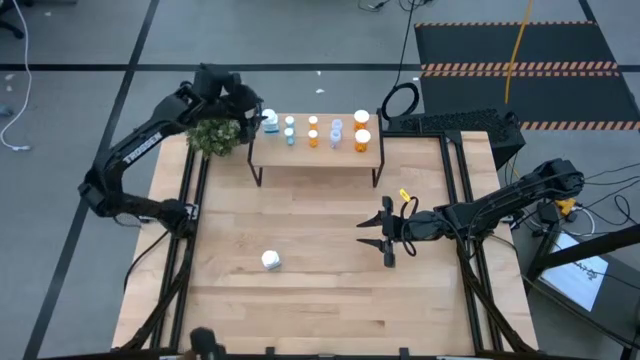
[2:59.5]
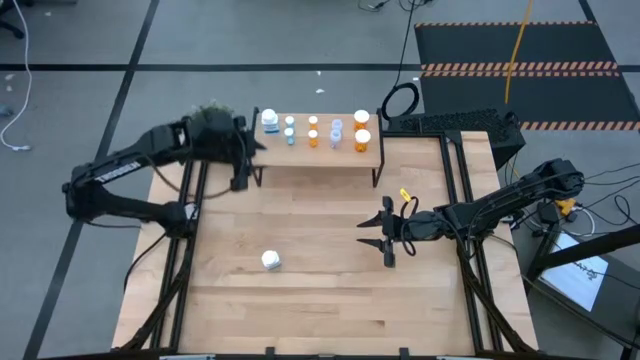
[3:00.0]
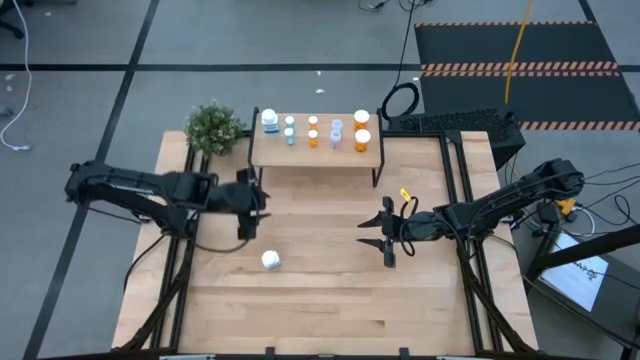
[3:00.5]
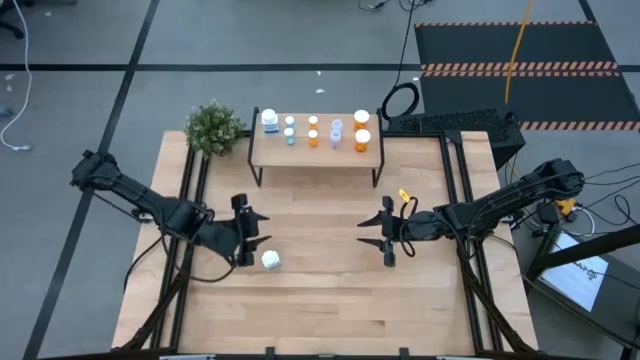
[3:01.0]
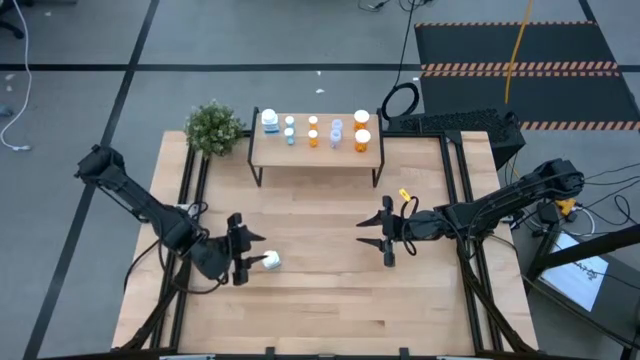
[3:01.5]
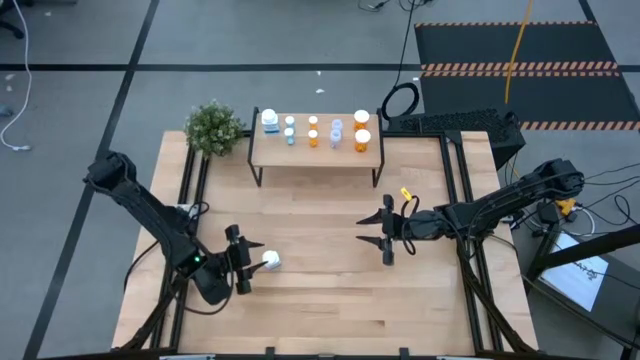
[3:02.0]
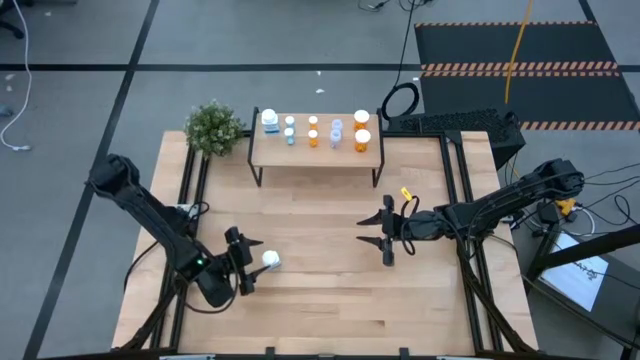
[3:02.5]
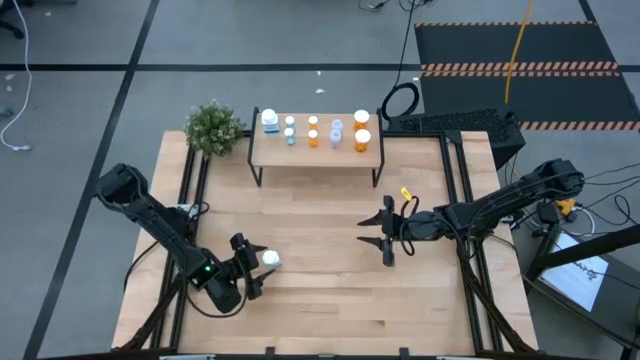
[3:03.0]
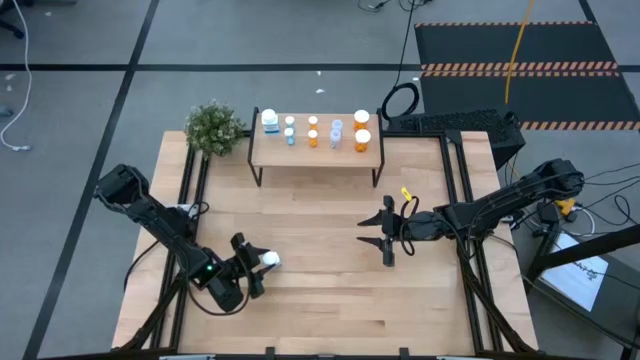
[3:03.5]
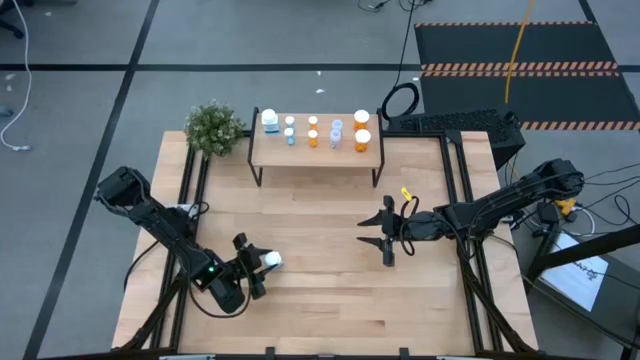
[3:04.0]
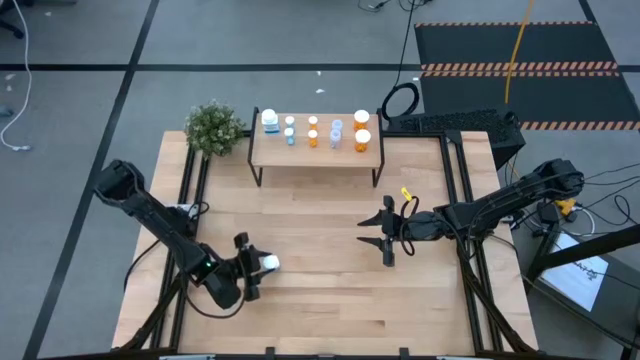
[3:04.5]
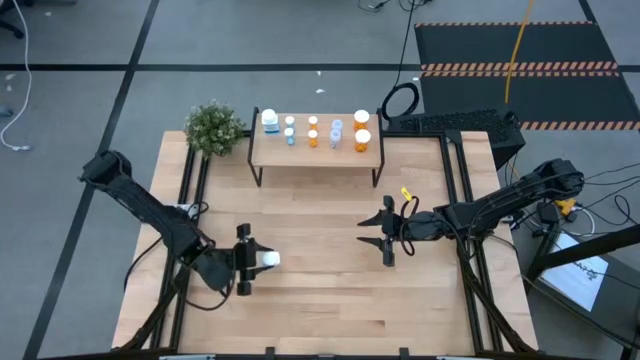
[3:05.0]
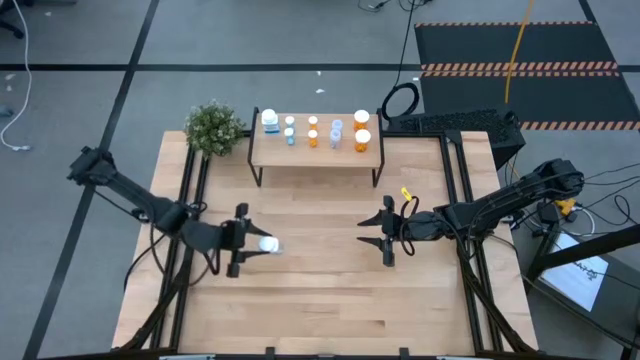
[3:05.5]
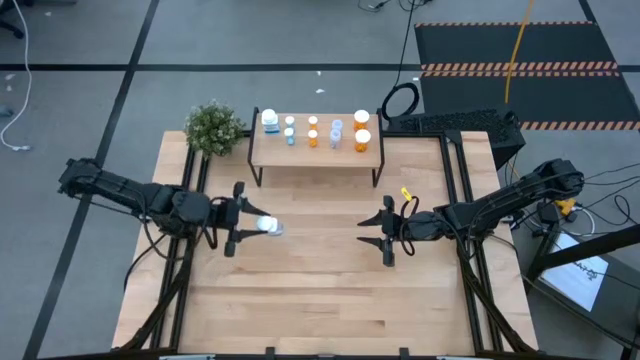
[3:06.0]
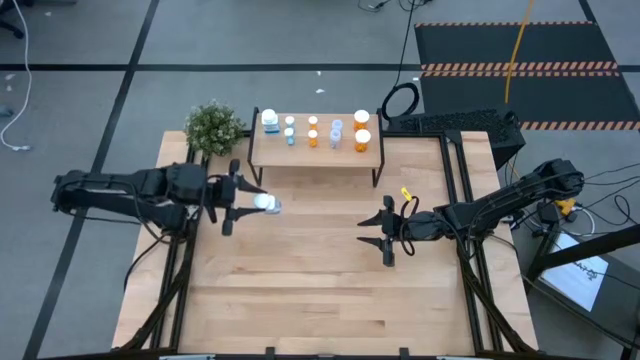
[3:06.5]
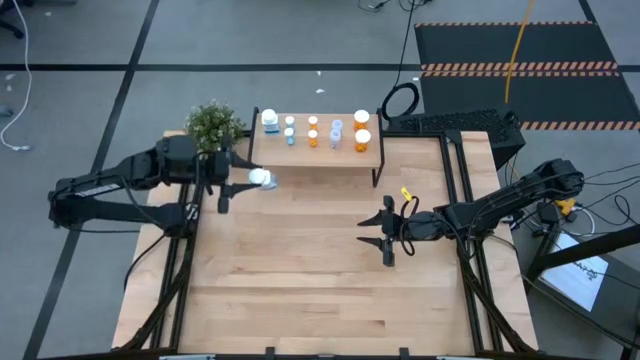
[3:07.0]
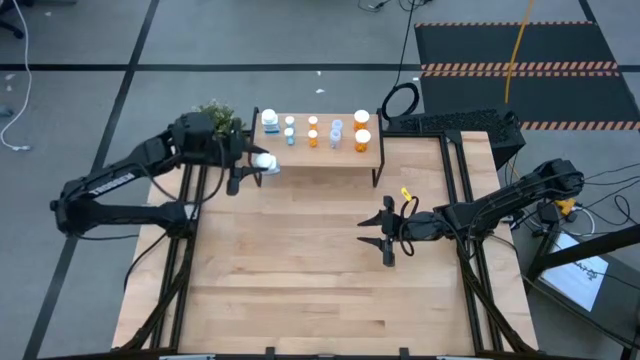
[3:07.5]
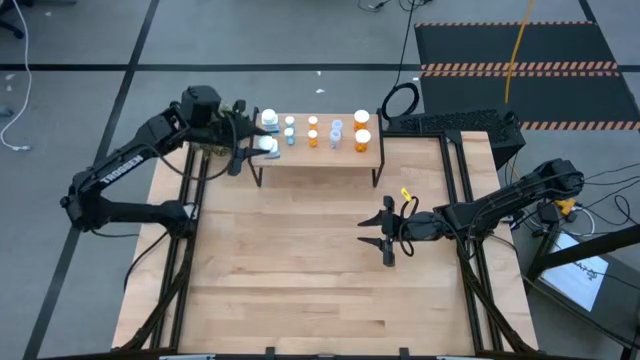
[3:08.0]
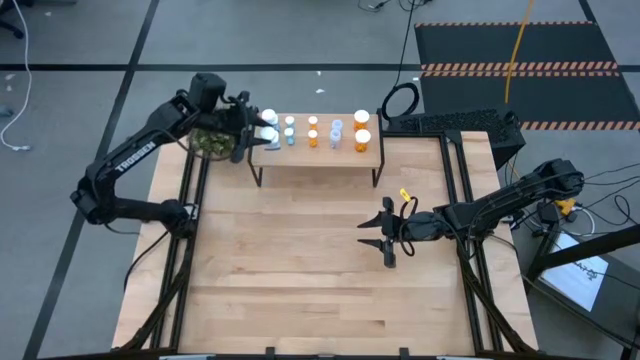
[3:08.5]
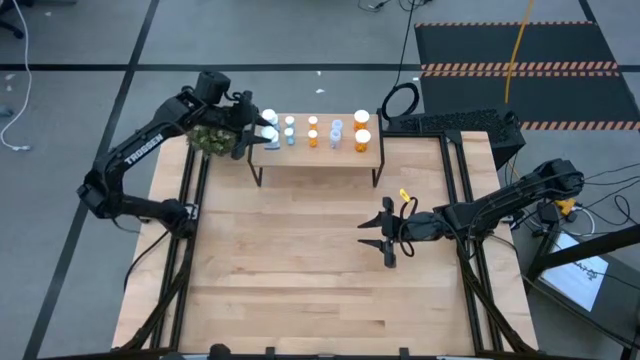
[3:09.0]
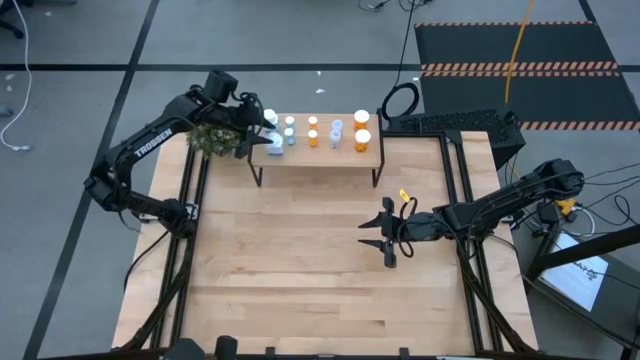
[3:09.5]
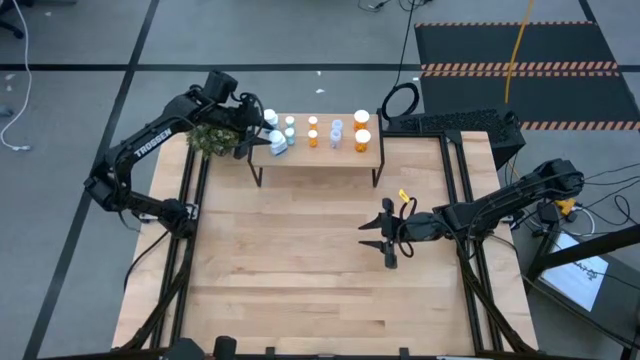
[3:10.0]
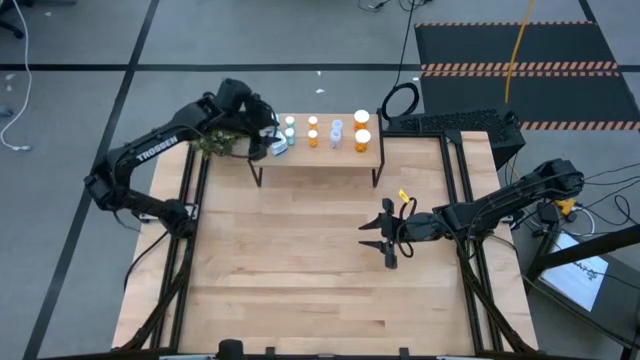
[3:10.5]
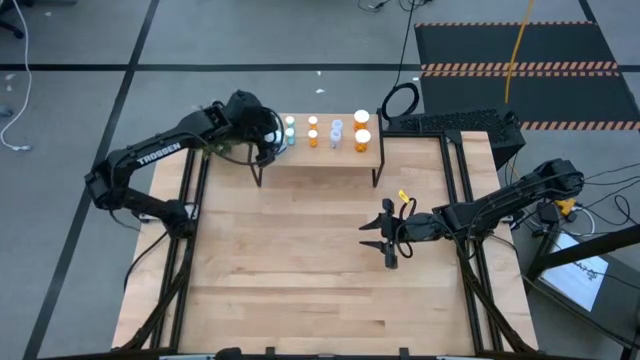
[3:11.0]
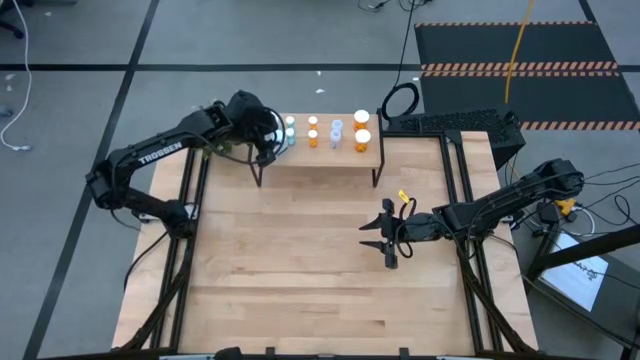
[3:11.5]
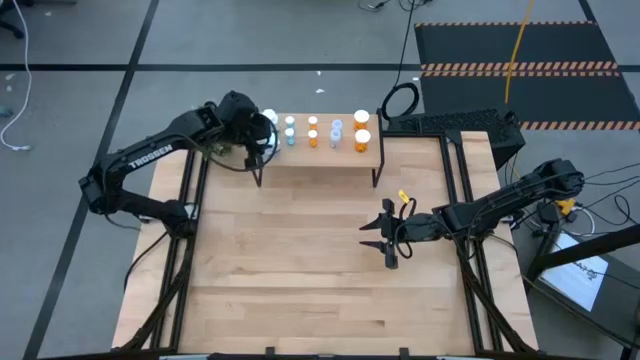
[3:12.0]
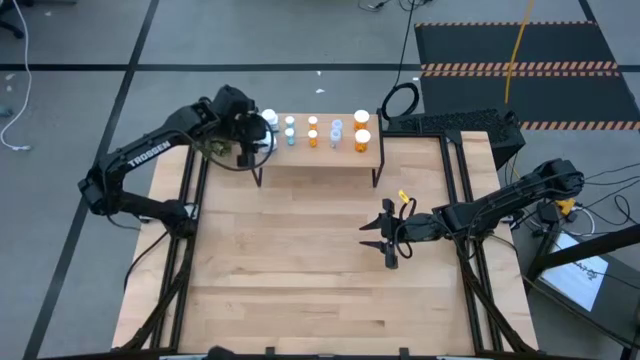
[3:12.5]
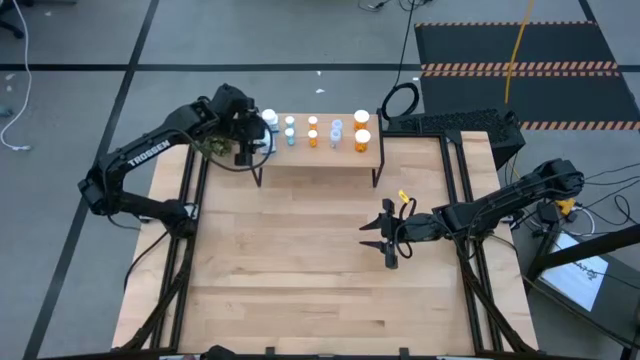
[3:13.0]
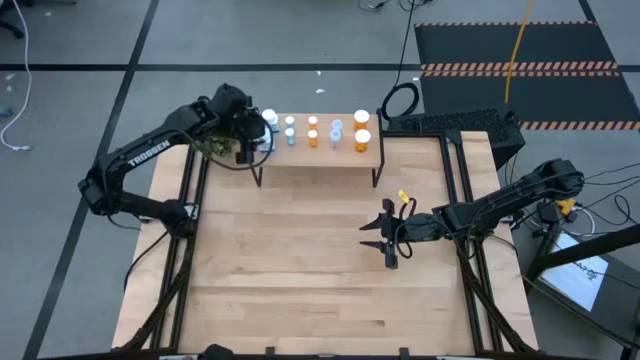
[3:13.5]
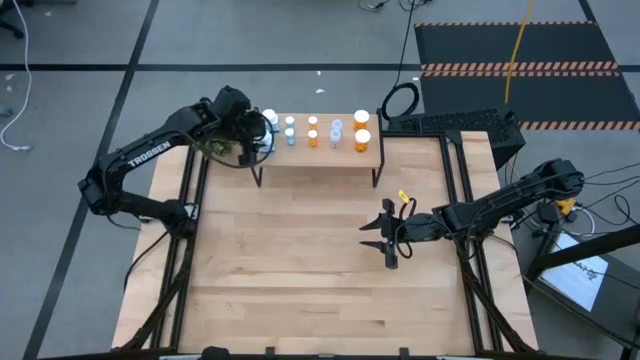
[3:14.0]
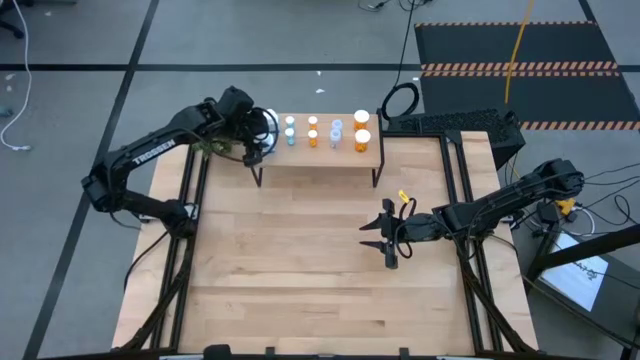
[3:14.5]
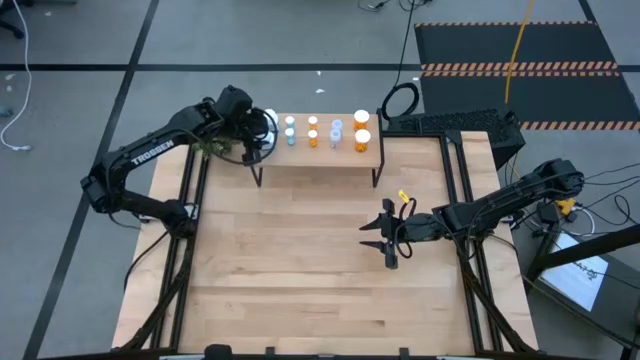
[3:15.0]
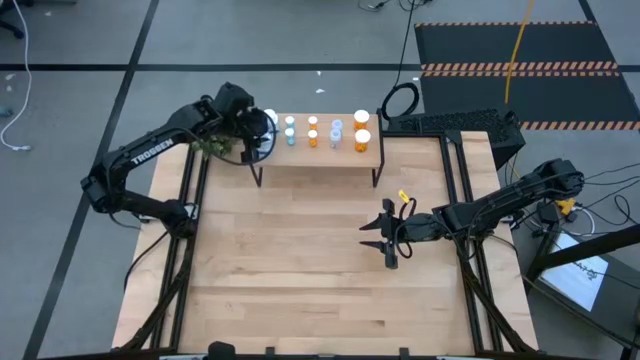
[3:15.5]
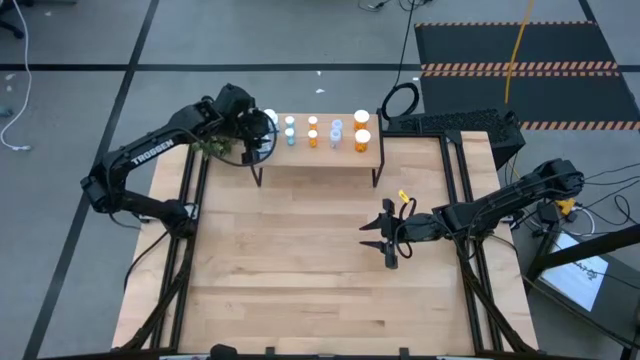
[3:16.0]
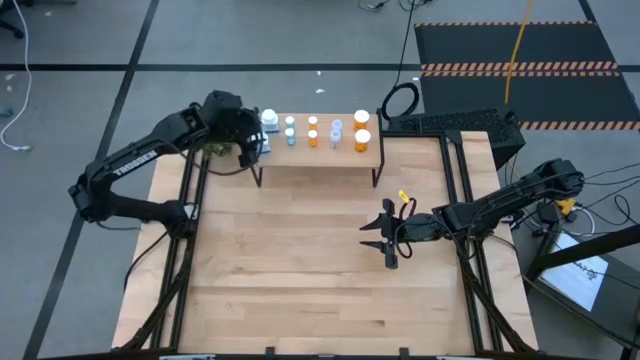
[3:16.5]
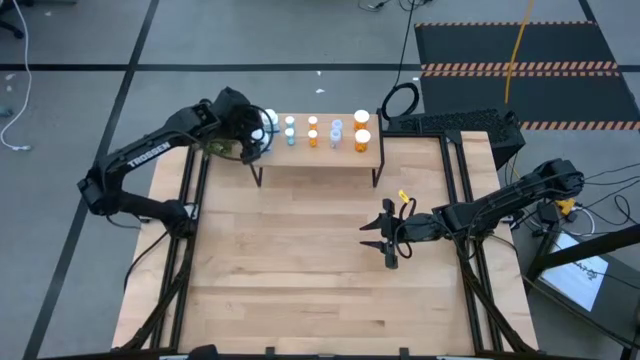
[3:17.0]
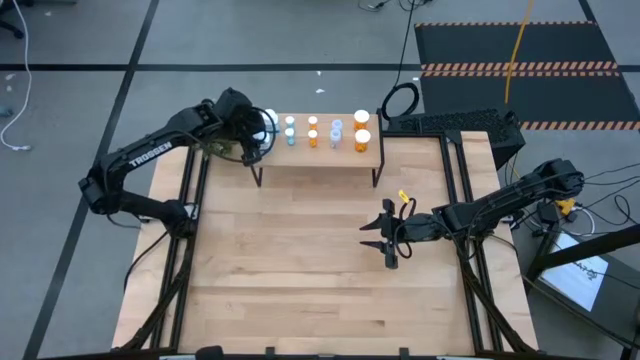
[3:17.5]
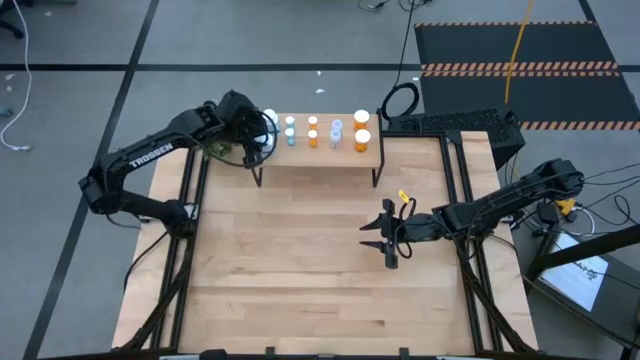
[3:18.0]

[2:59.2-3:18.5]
Task: Pick and place medicine bottles onto shelf by color
Put the white medicine bottle on the shelf aligned with the white medicine bottle

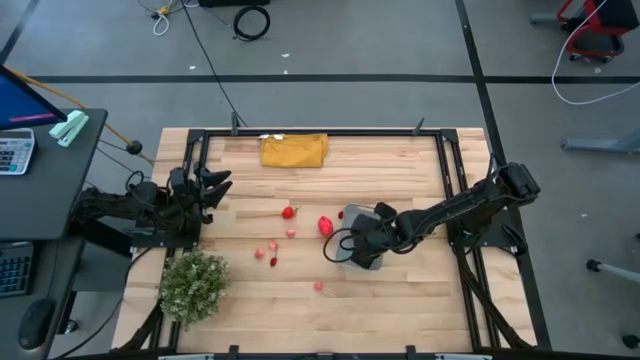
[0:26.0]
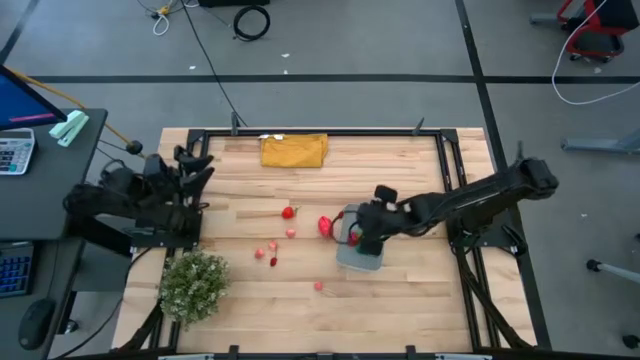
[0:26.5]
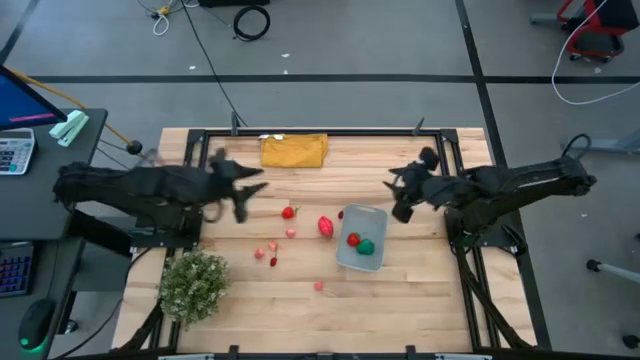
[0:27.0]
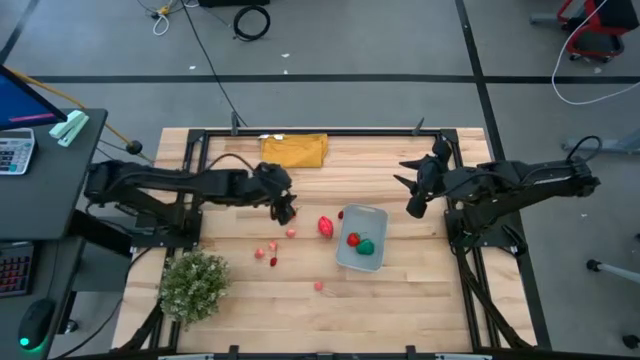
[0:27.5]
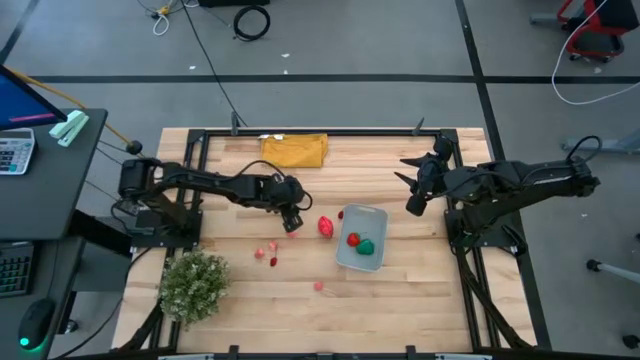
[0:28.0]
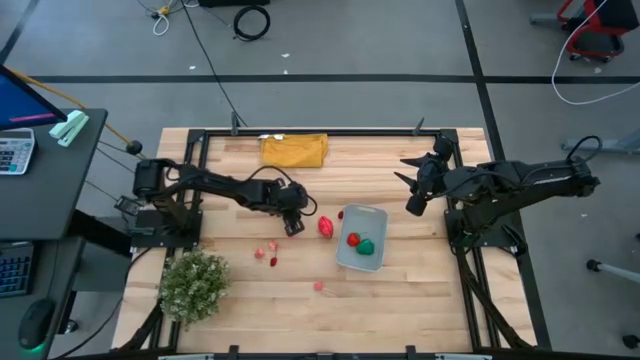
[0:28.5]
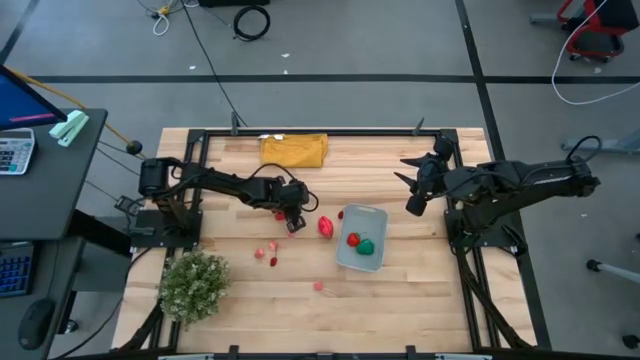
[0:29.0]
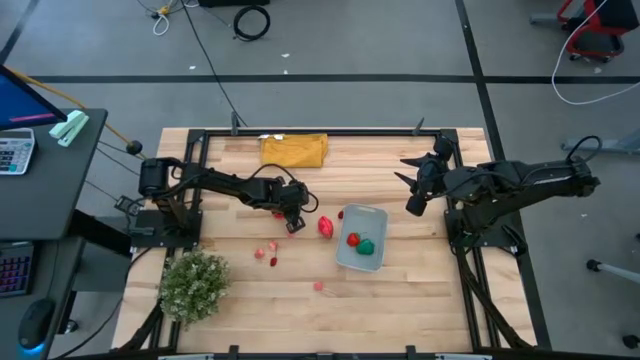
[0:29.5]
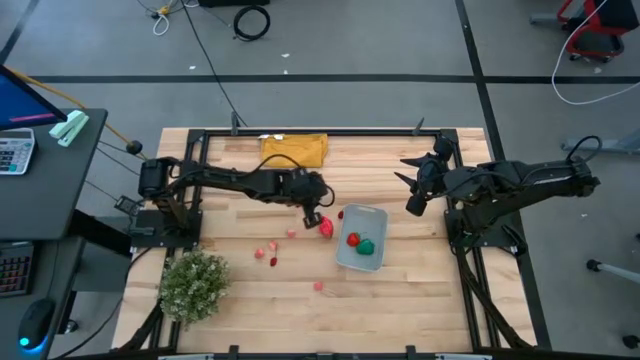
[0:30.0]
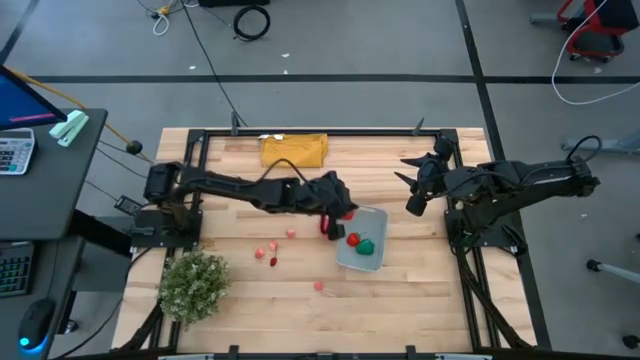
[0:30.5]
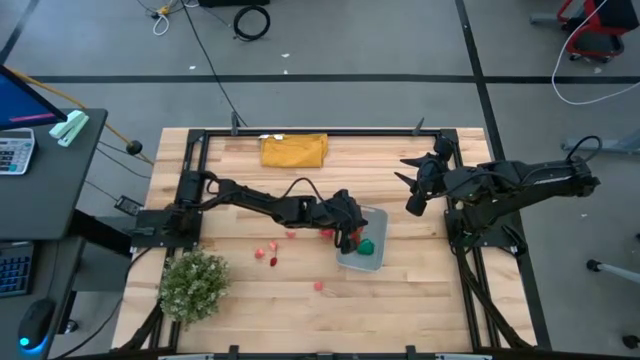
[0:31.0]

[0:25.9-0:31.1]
Task: Pick and placing Produce into tupperware
Put the red strawberry into the gray bin
